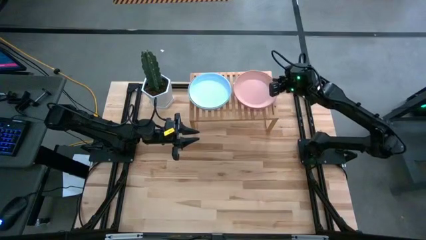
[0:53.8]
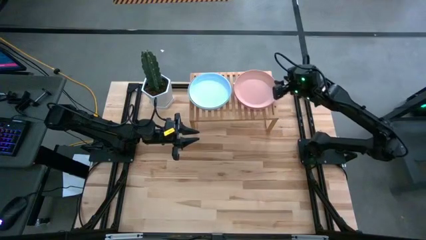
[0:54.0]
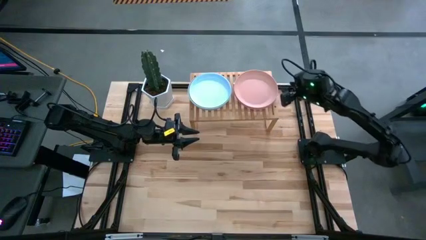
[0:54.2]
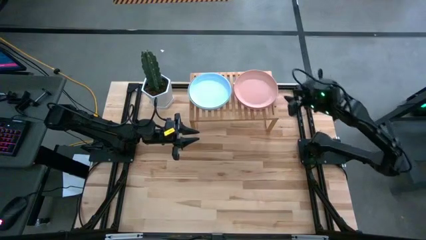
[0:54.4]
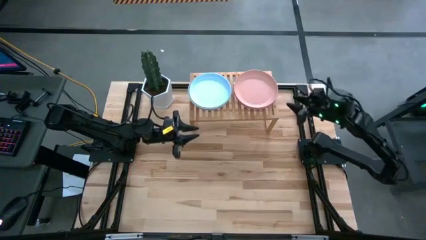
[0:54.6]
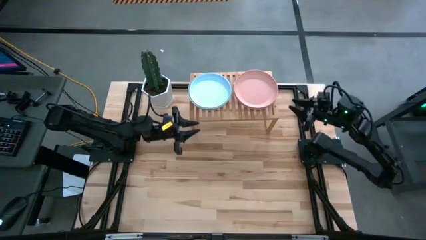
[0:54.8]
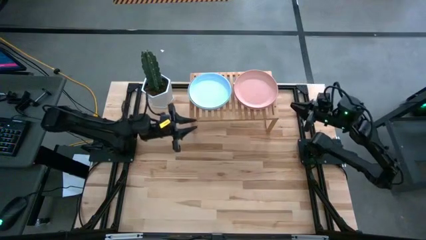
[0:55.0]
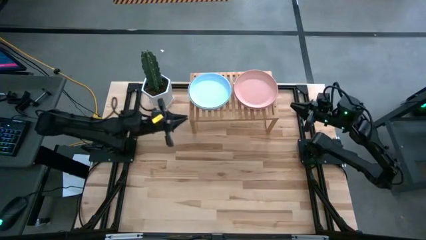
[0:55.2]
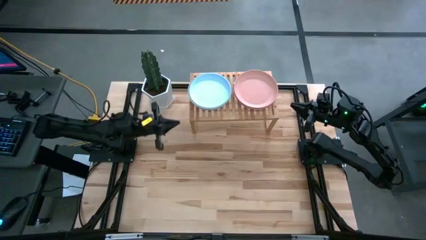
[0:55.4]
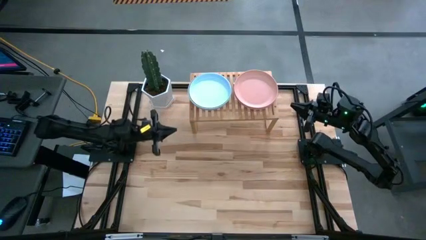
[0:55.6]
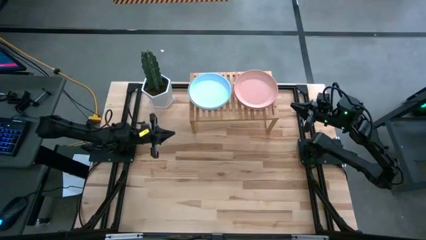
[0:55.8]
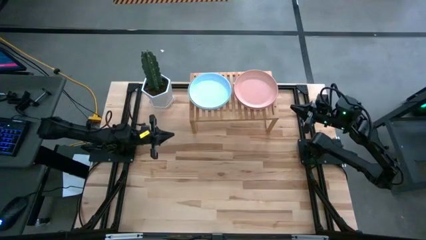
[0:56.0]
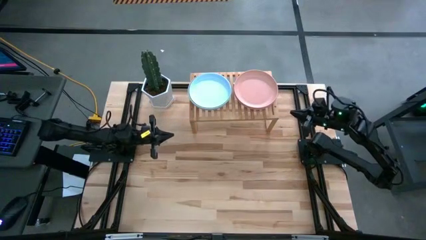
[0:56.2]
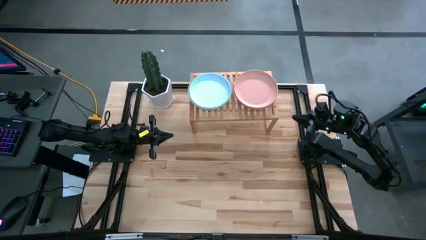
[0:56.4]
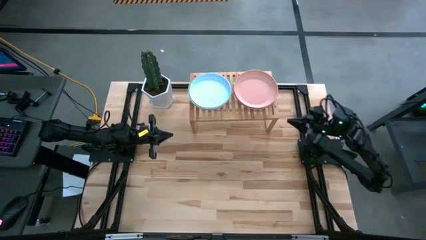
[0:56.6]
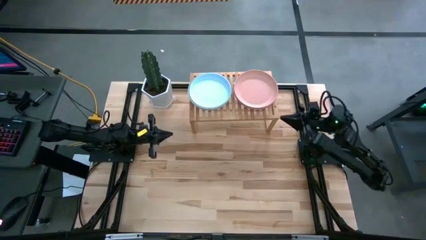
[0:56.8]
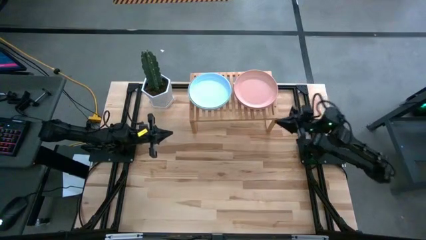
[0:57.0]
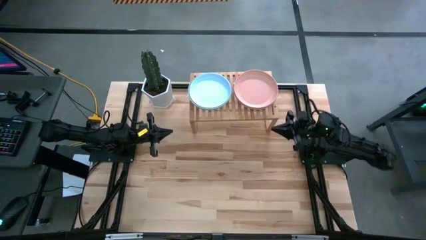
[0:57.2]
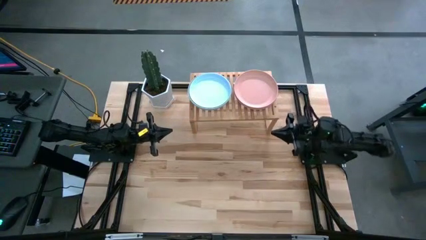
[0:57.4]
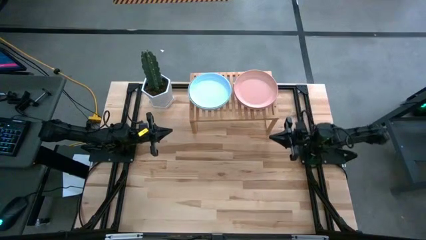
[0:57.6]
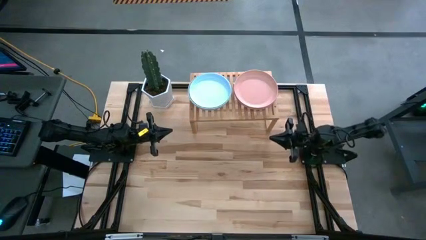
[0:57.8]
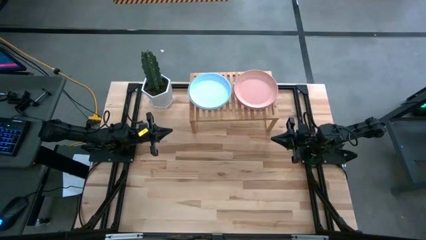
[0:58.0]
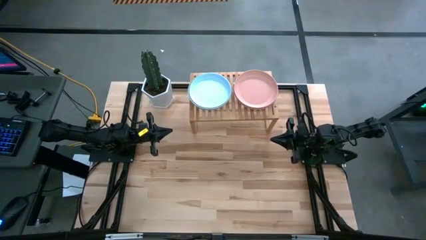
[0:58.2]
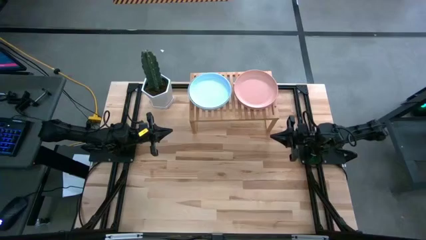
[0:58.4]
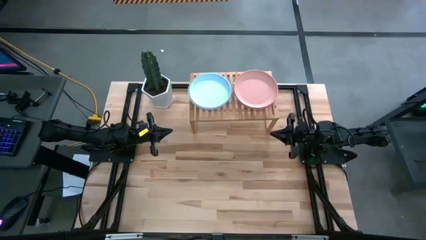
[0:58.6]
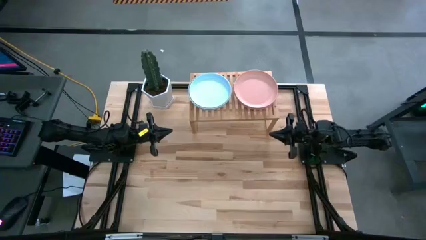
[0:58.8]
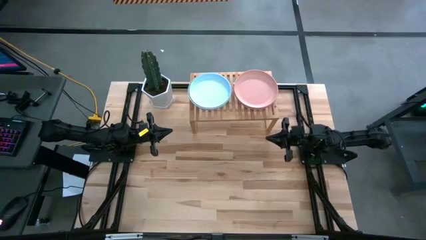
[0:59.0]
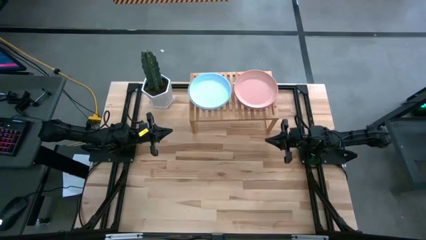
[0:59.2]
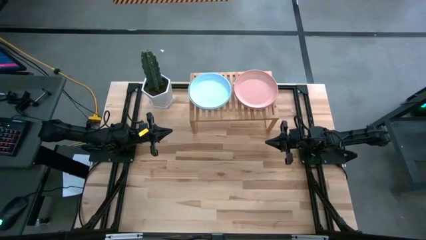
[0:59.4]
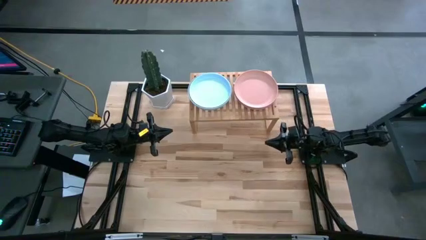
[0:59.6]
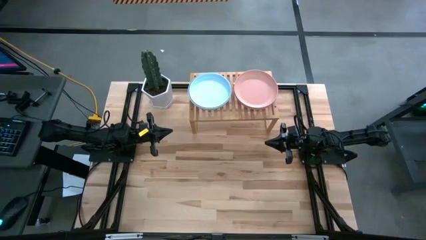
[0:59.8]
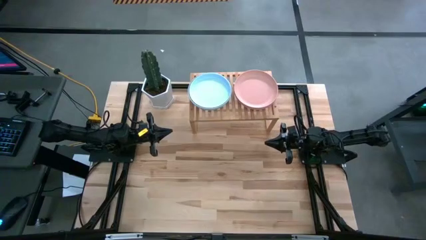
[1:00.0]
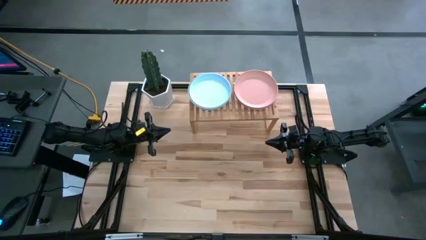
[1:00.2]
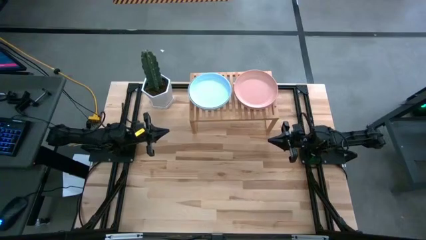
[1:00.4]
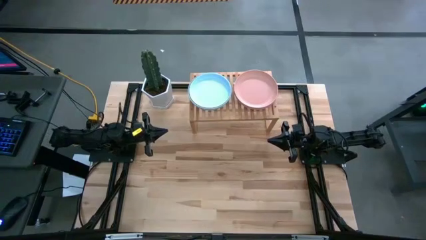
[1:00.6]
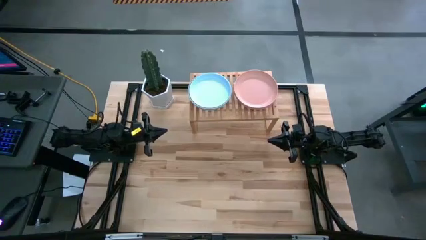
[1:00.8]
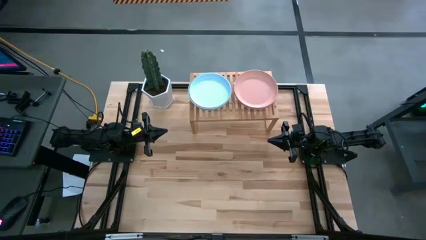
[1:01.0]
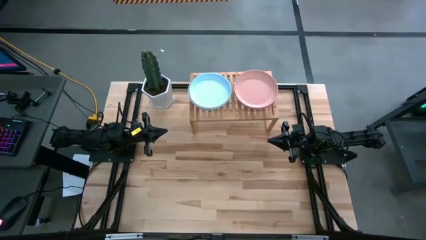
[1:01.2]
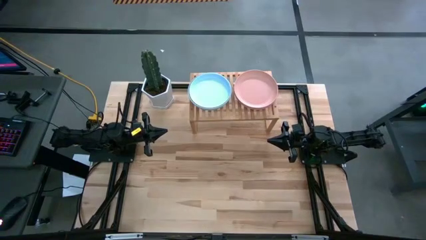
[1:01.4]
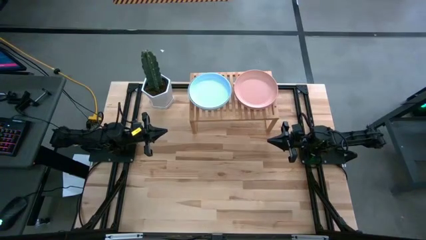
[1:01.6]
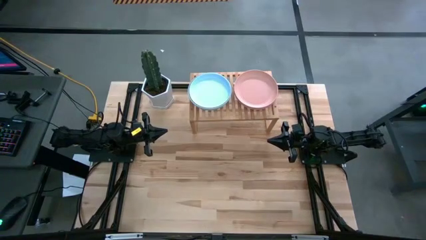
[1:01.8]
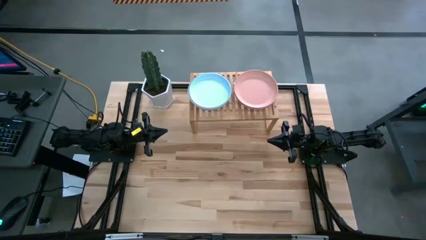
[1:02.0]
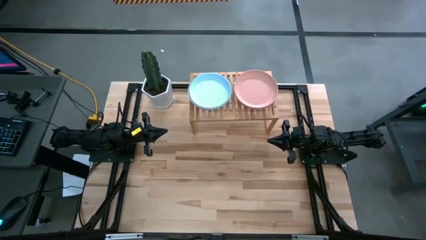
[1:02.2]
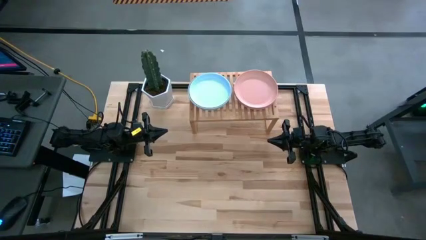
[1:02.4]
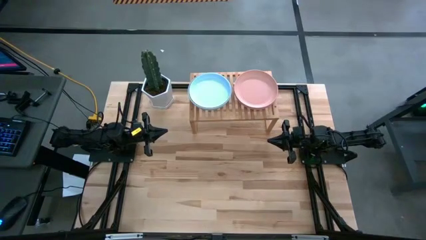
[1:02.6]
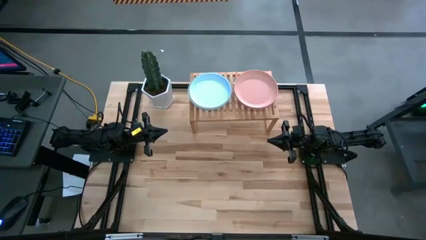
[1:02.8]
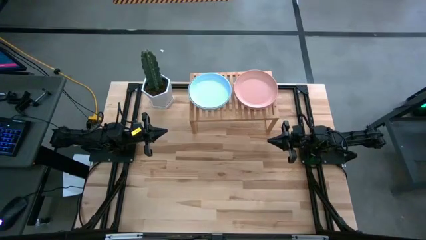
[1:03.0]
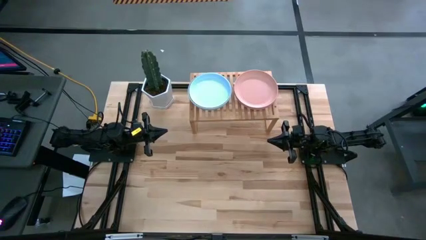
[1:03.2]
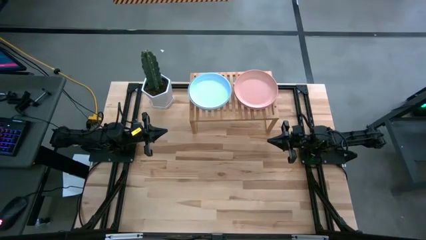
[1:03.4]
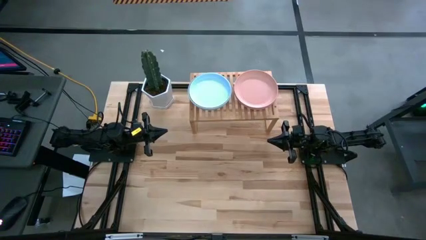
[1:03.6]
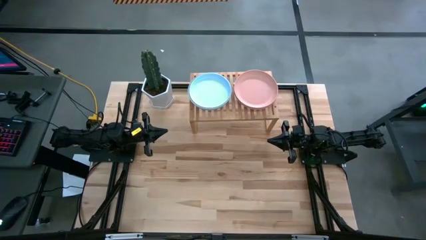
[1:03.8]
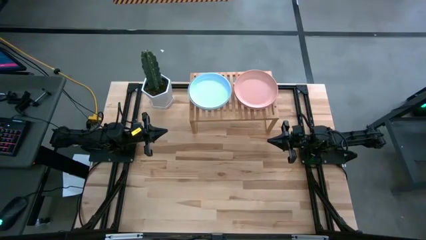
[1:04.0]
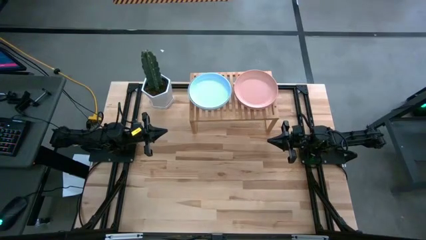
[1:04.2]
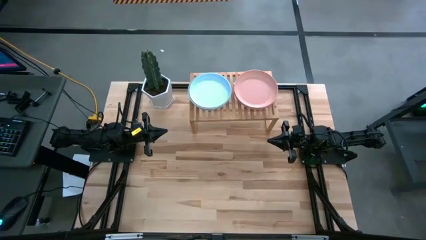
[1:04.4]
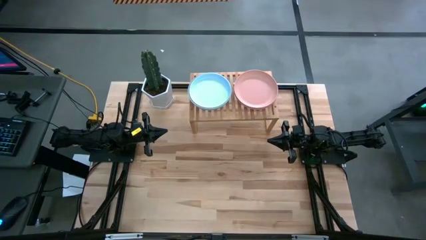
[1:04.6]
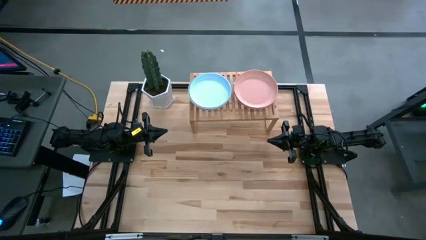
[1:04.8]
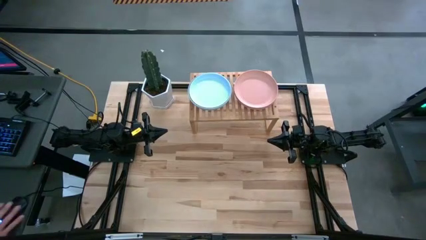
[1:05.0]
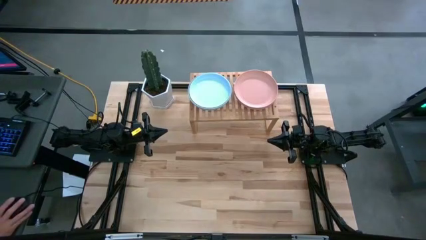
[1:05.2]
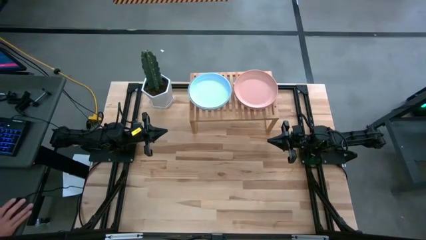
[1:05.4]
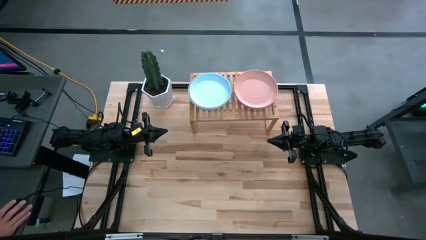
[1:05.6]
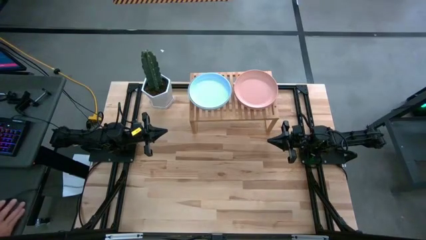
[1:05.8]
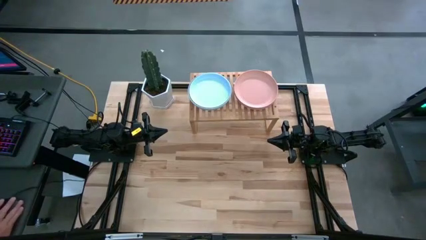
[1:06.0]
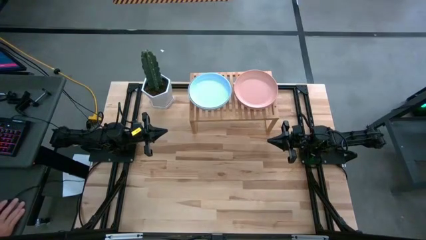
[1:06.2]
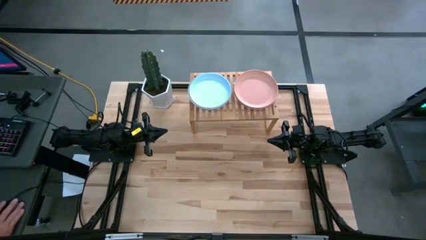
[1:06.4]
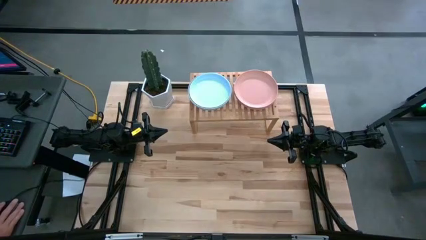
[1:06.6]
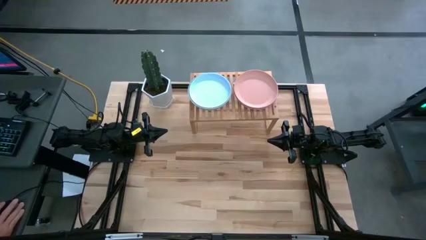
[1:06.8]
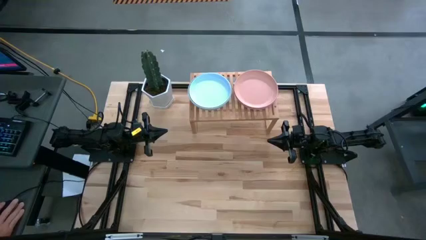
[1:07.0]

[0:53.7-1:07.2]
Task: Place and stack plates onto a shelf
Return to Home Position
